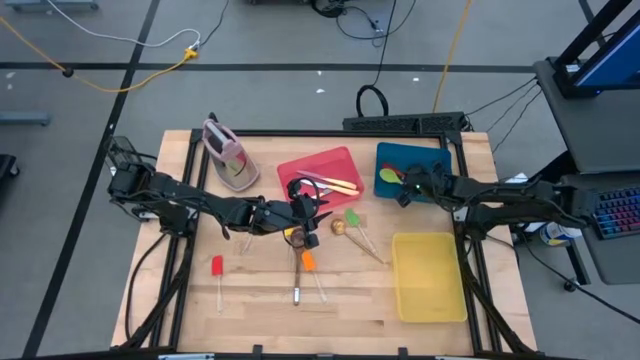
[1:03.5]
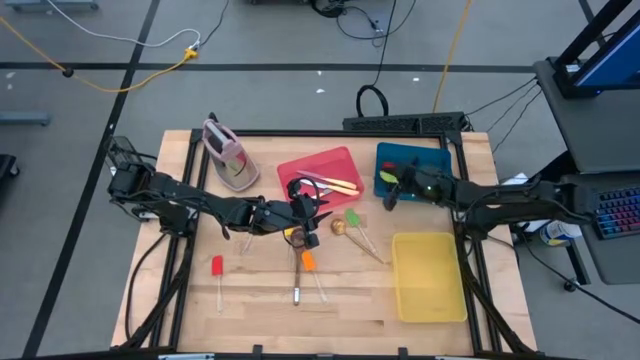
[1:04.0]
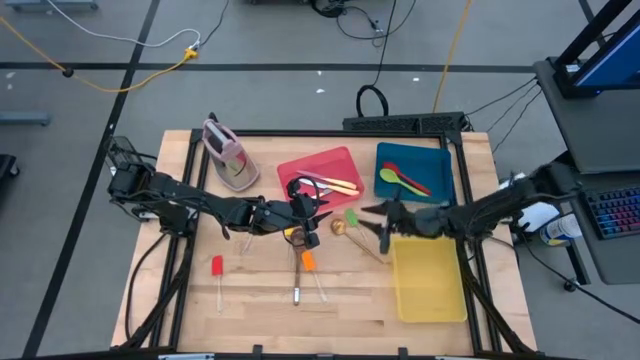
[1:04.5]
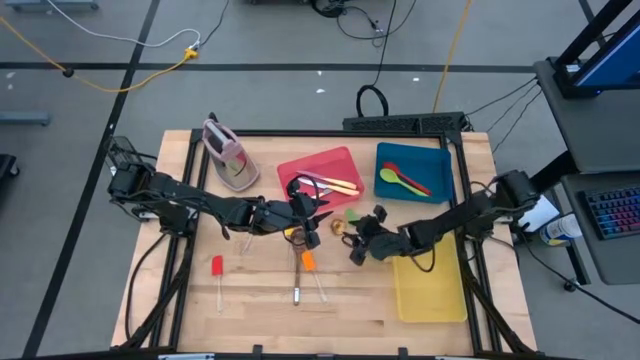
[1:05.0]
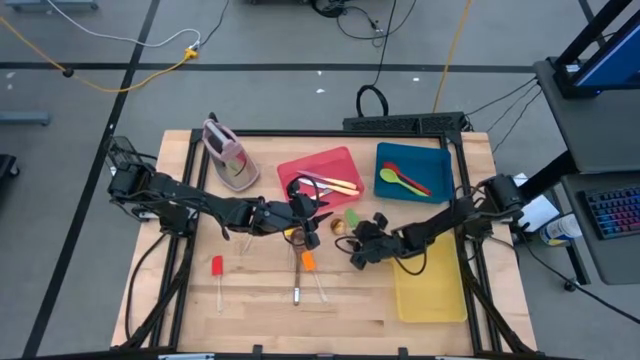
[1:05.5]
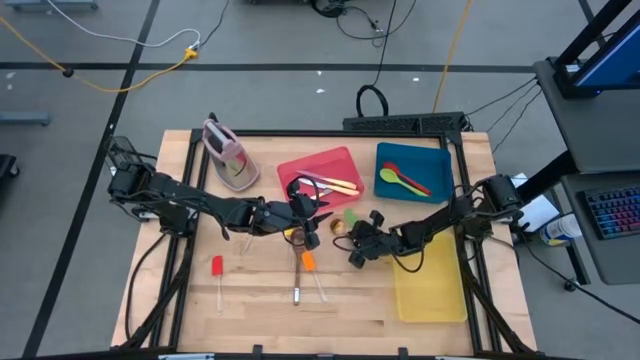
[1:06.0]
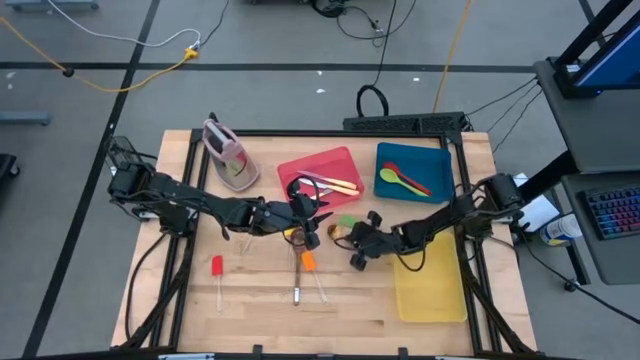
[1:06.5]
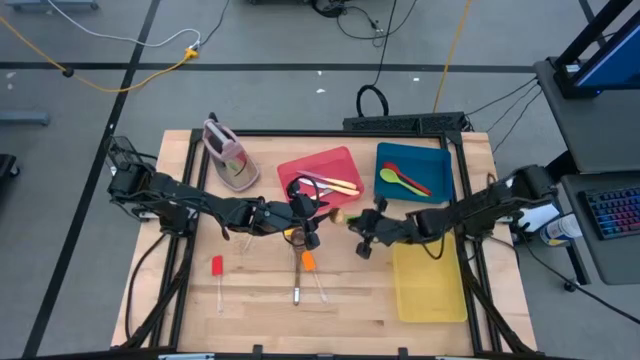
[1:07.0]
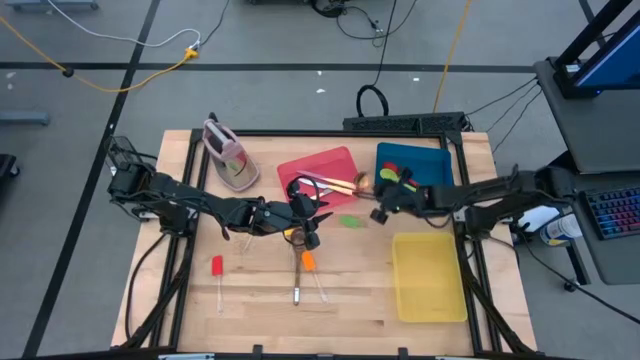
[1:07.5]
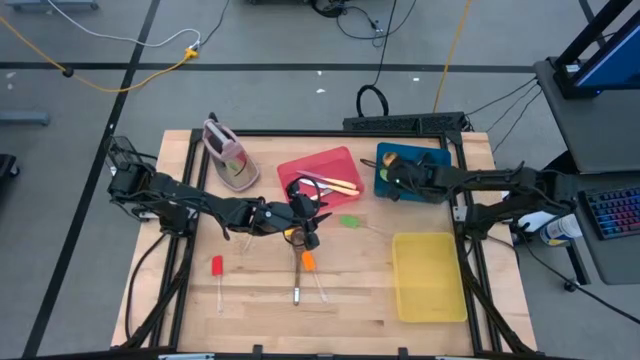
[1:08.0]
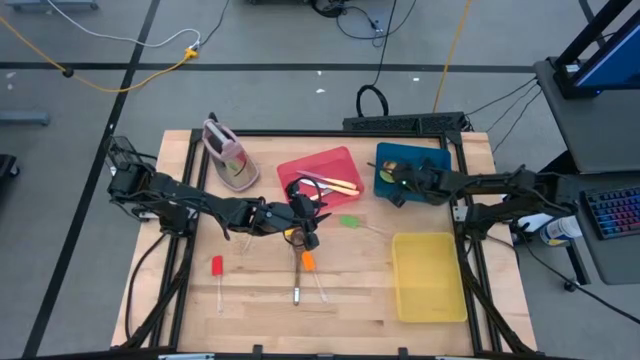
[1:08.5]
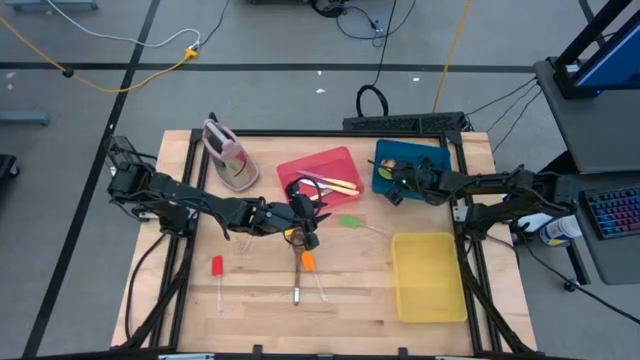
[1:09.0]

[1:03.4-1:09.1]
Task: Pick & Place Kitchen Items
Put the gold serving spoon into the blue bin

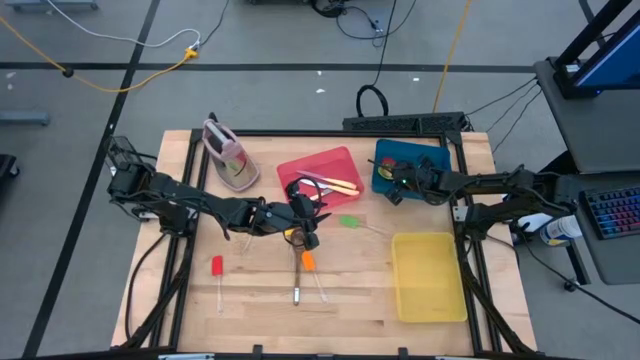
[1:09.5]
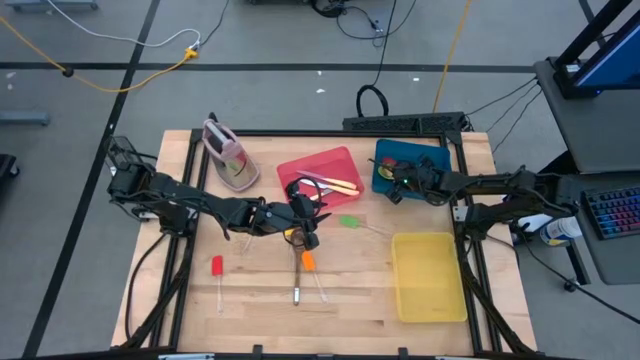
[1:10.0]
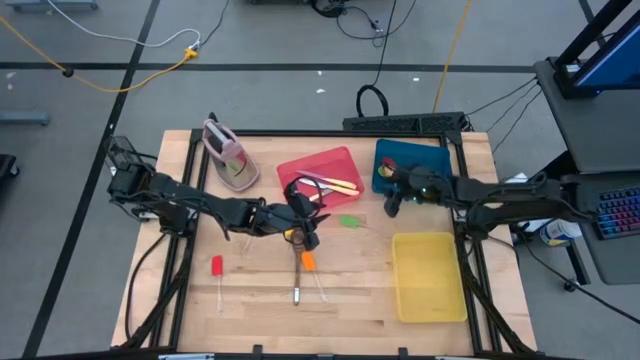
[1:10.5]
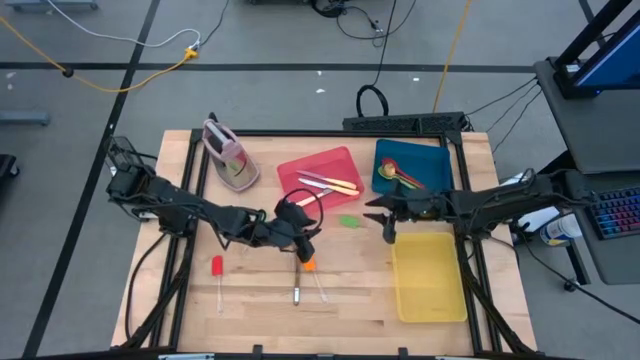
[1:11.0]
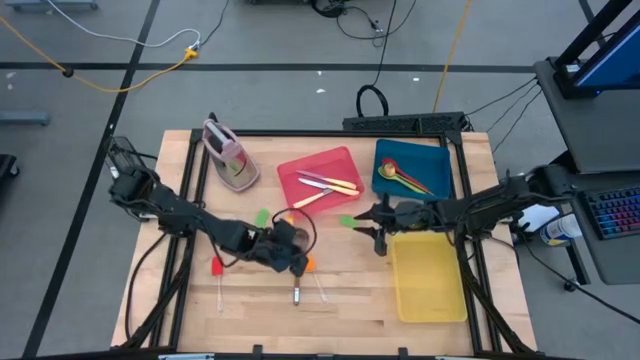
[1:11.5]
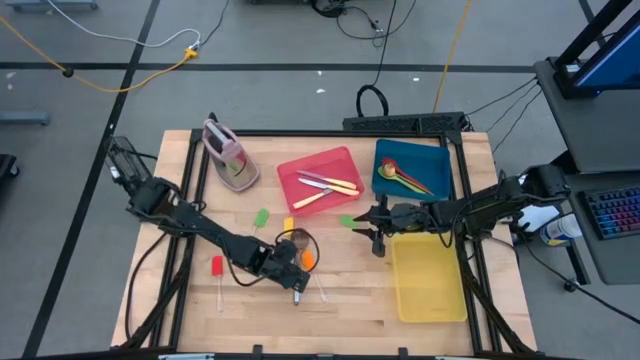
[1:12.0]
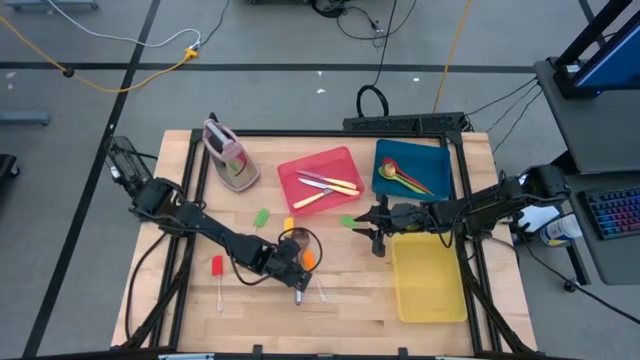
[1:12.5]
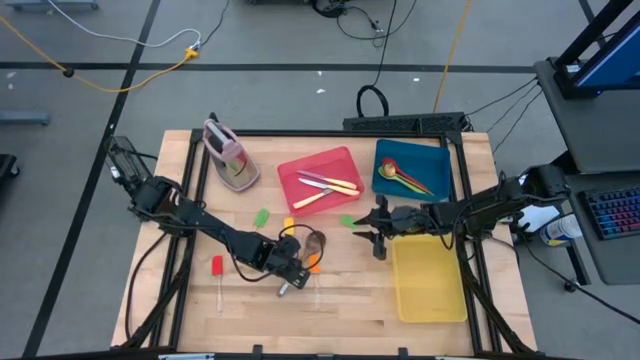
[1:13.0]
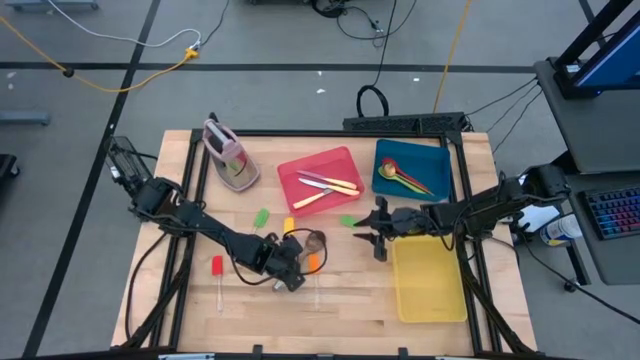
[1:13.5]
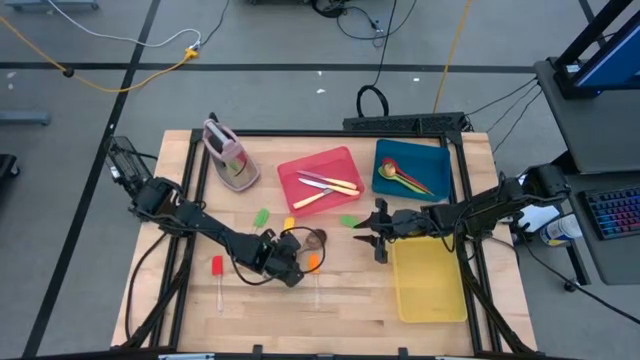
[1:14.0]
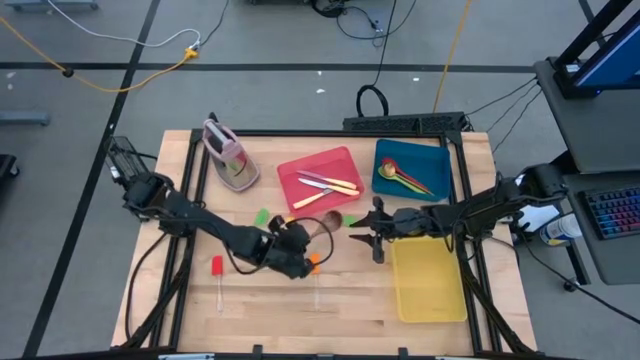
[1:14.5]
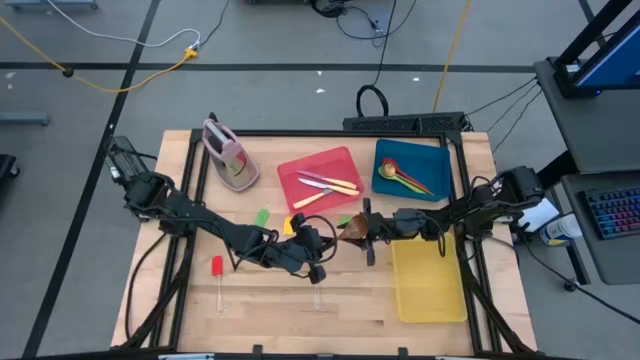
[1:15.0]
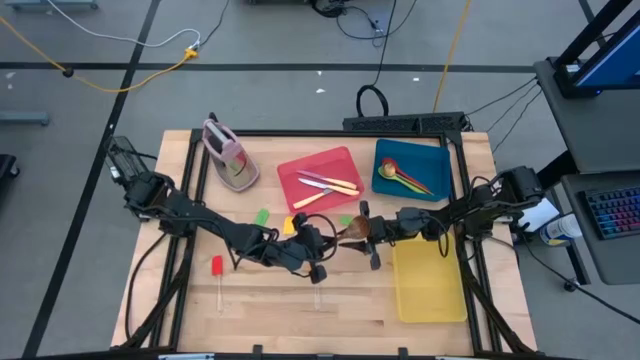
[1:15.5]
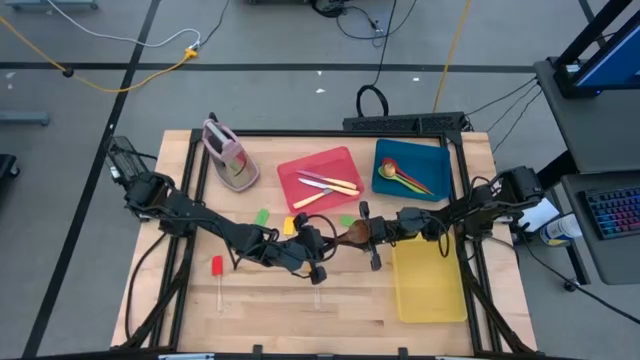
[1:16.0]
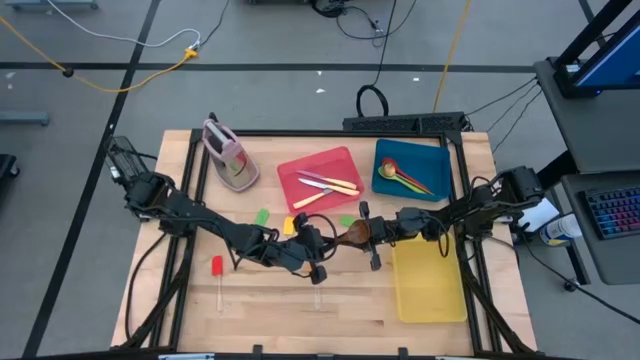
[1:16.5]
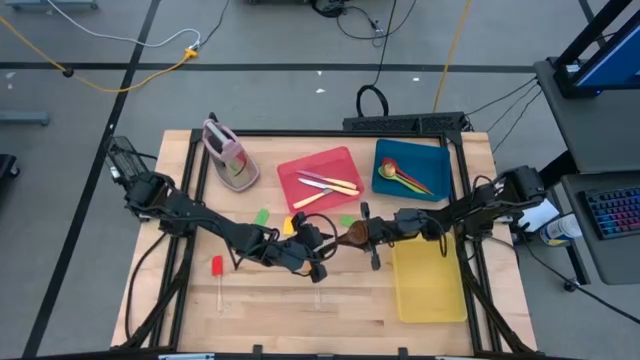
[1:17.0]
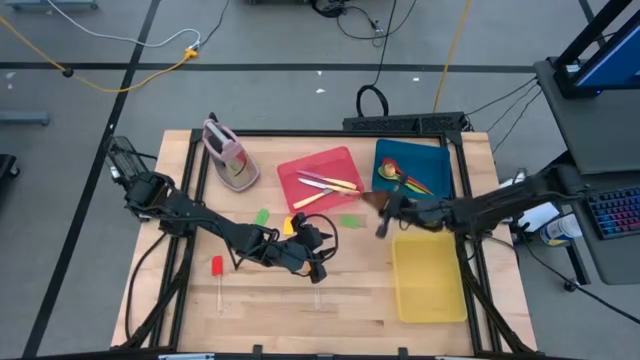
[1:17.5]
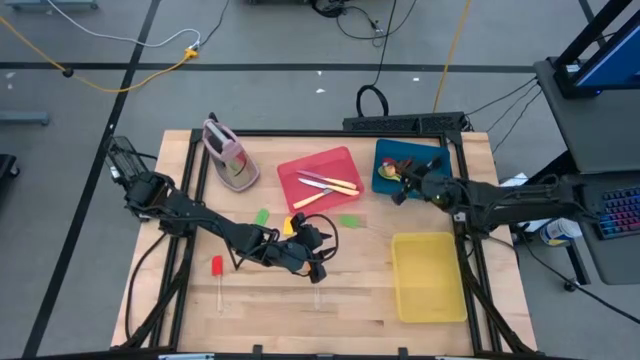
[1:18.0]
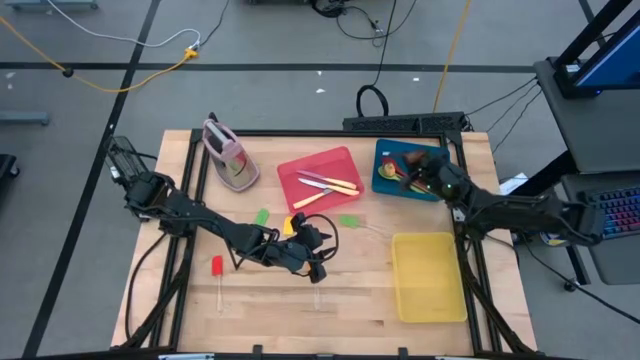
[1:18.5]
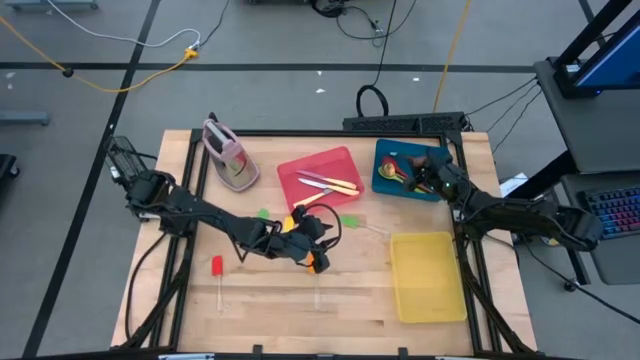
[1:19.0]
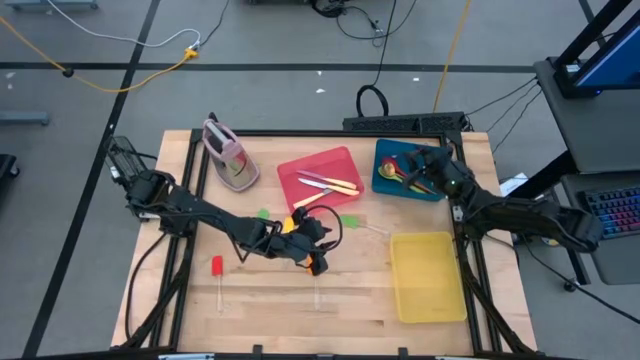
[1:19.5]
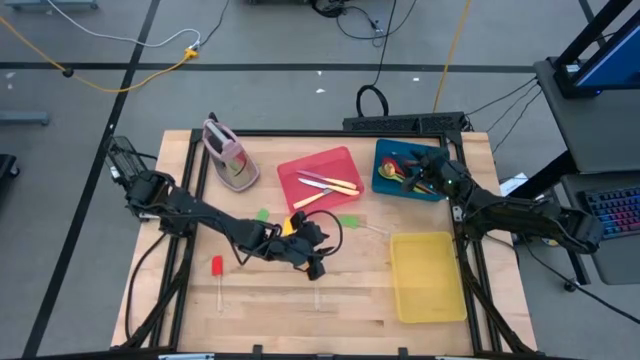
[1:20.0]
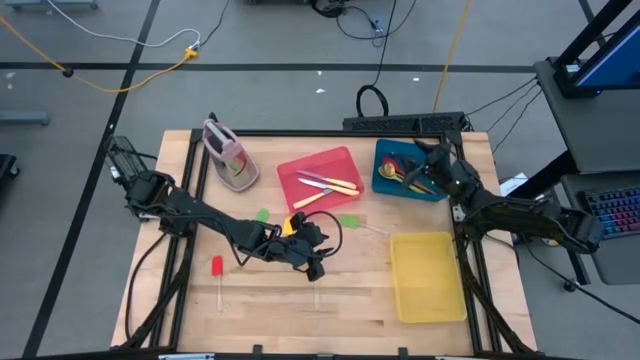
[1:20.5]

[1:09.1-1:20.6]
Put the brown serving spoon into the blue bin

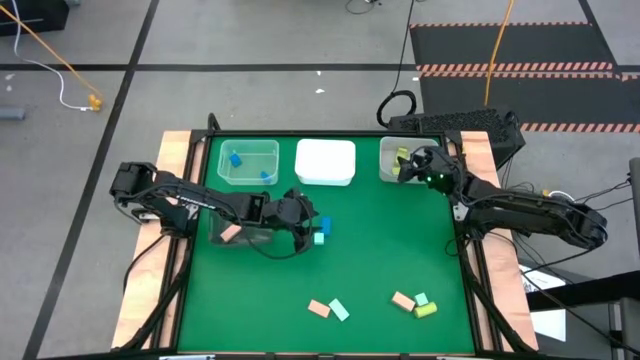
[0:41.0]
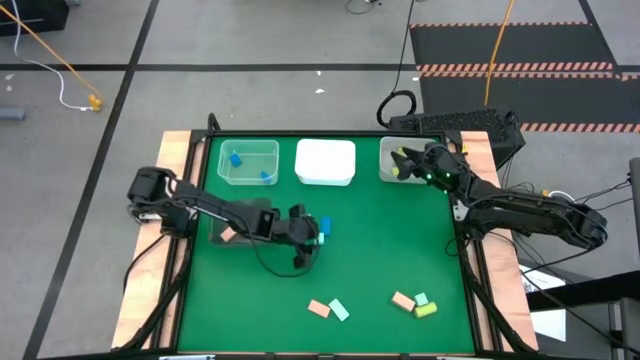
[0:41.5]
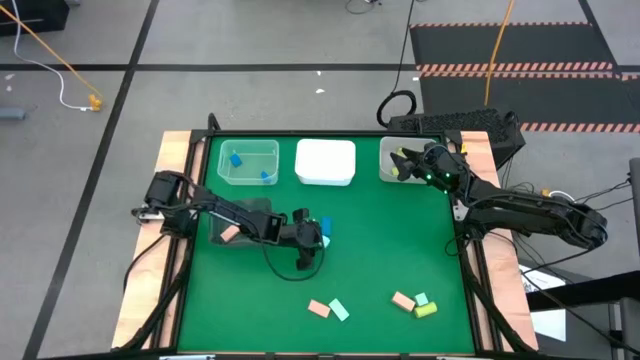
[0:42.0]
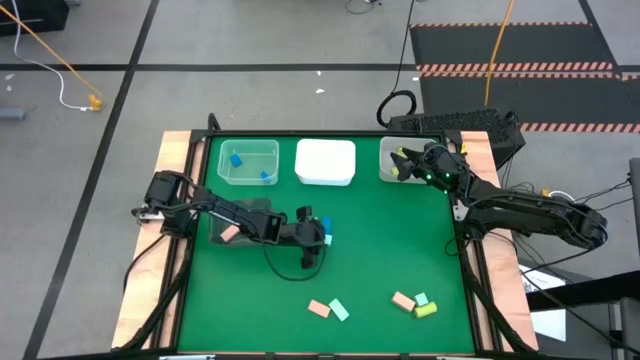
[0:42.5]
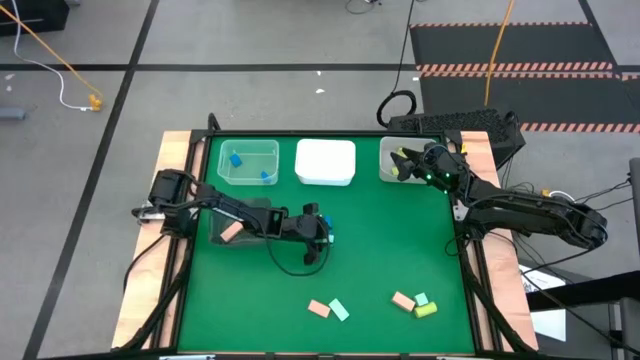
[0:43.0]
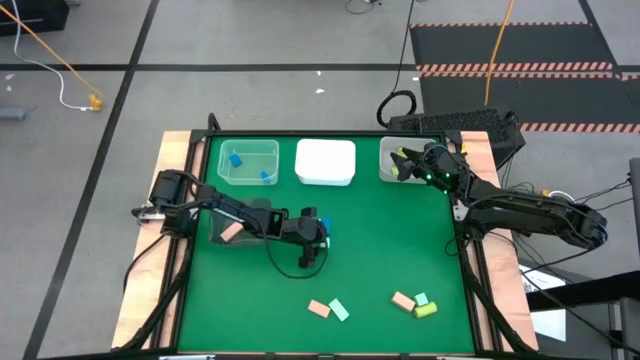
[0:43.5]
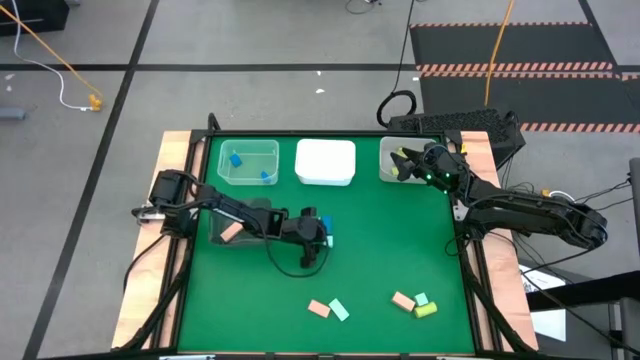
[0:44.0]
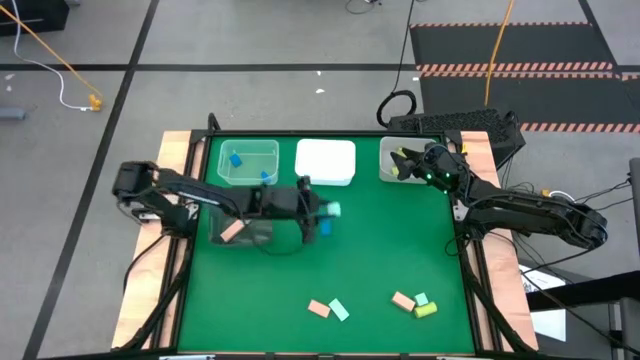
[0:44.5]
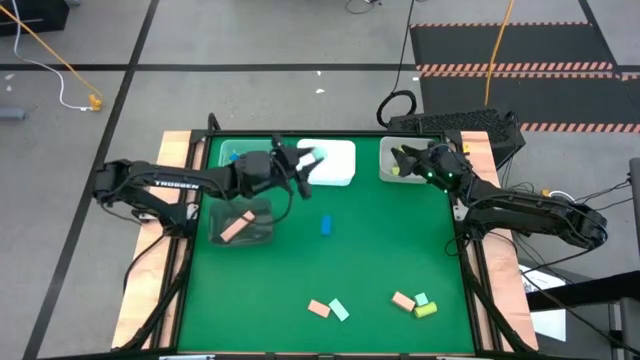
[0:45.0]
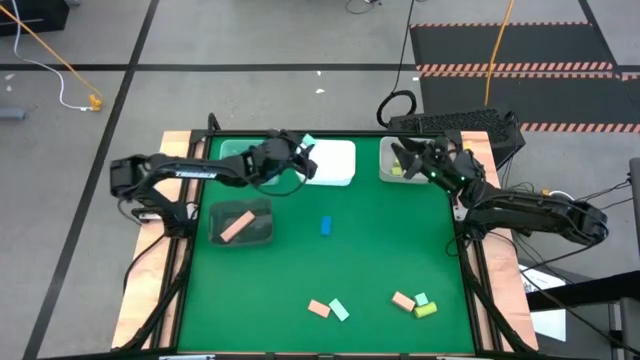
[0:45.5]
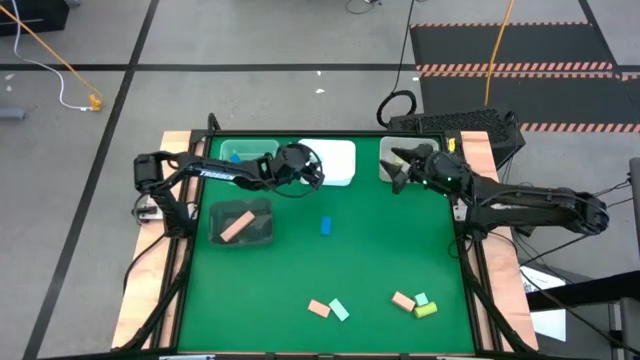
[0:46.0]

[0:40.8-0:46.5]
Task: Sort & place blocks by color
Put the light blue block into the white bin
